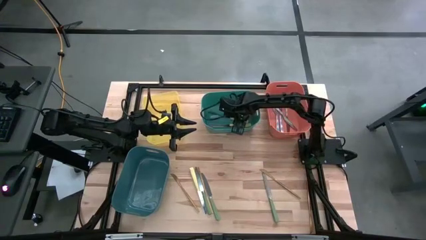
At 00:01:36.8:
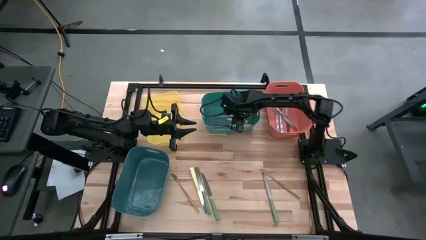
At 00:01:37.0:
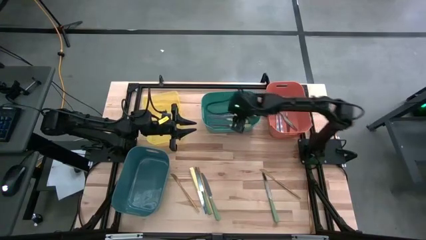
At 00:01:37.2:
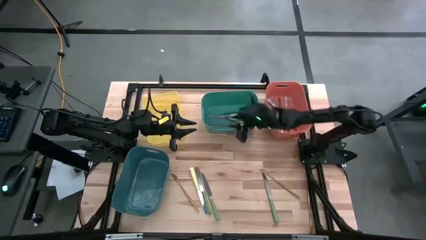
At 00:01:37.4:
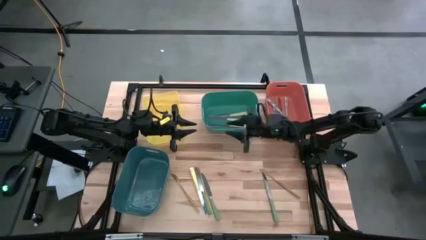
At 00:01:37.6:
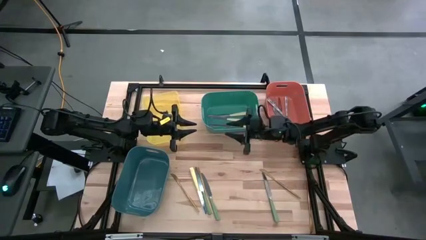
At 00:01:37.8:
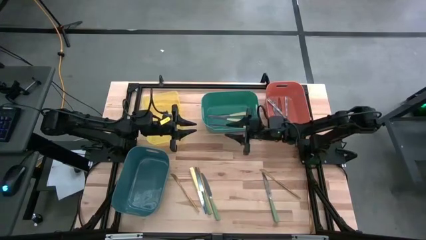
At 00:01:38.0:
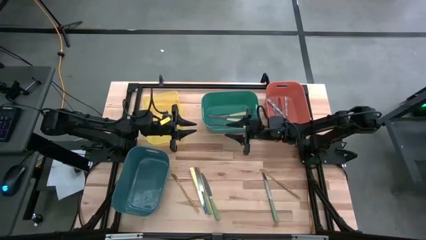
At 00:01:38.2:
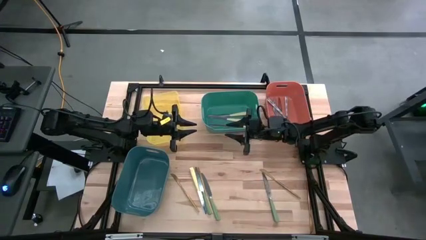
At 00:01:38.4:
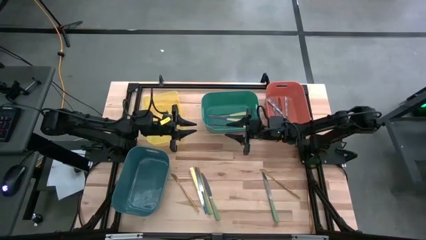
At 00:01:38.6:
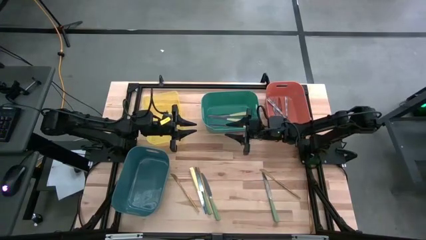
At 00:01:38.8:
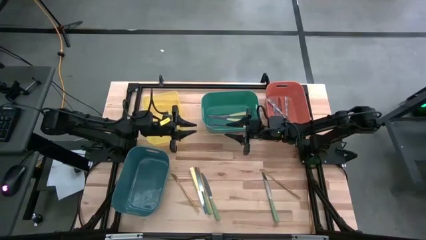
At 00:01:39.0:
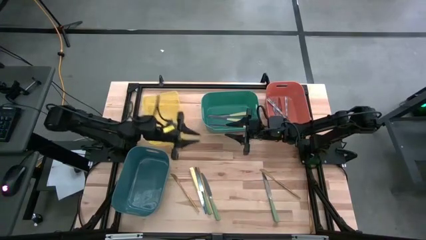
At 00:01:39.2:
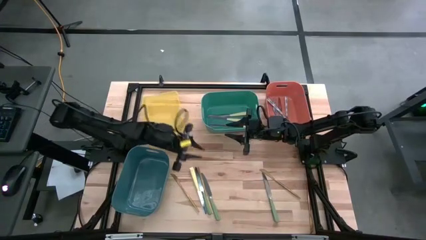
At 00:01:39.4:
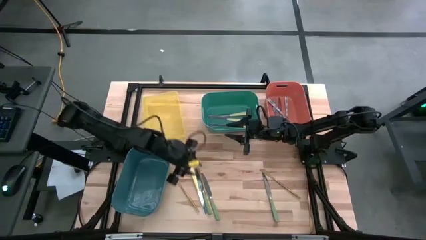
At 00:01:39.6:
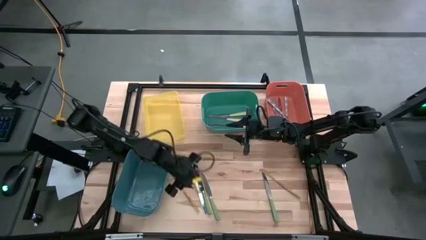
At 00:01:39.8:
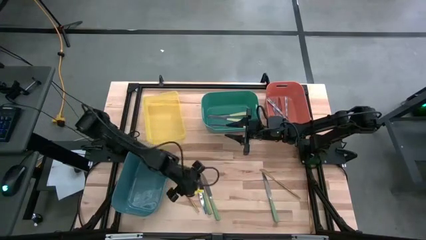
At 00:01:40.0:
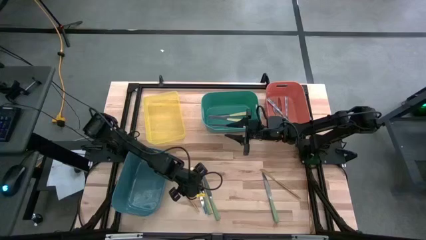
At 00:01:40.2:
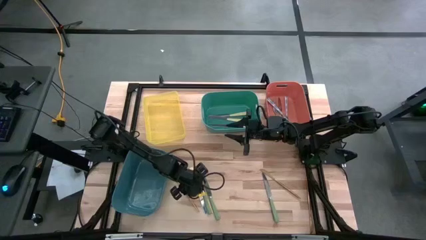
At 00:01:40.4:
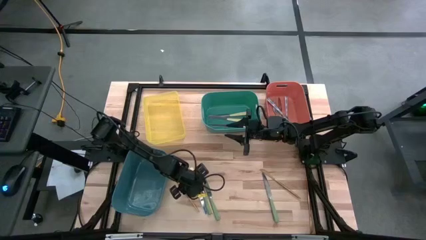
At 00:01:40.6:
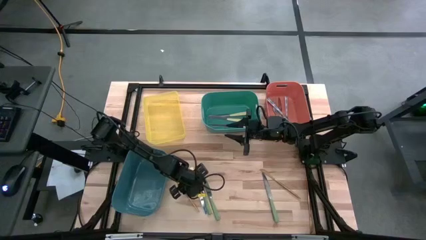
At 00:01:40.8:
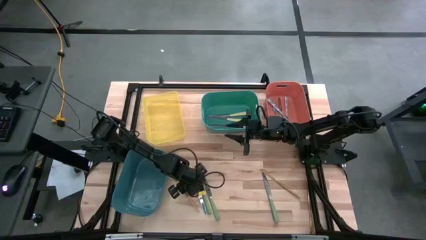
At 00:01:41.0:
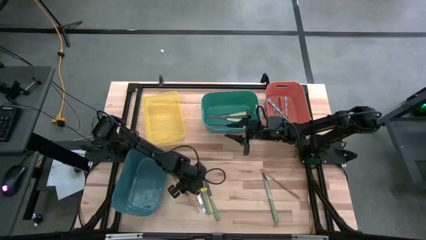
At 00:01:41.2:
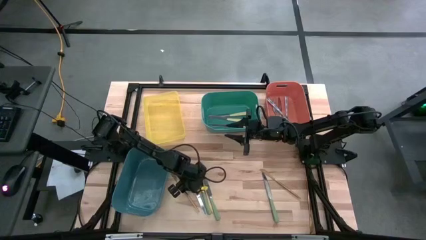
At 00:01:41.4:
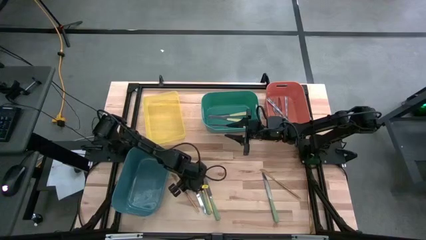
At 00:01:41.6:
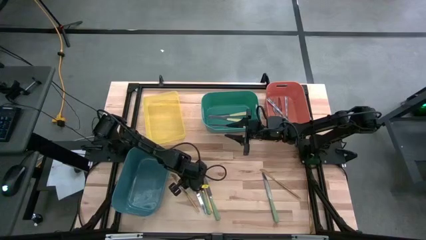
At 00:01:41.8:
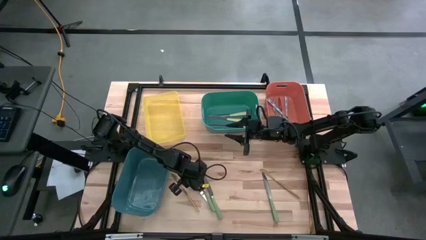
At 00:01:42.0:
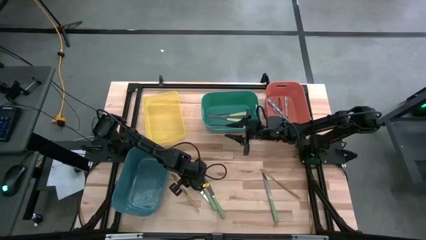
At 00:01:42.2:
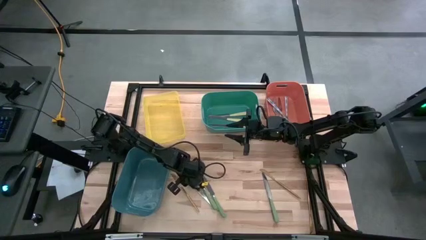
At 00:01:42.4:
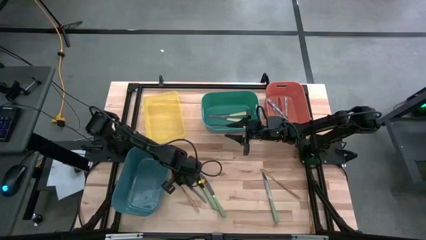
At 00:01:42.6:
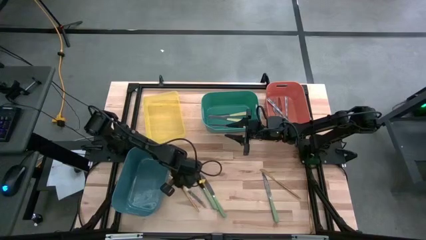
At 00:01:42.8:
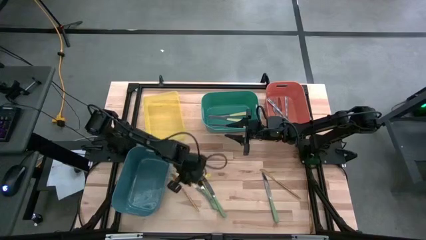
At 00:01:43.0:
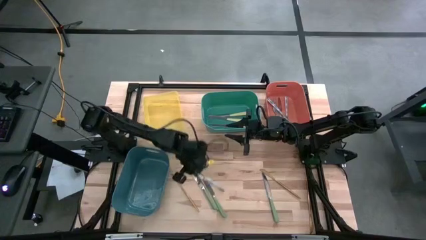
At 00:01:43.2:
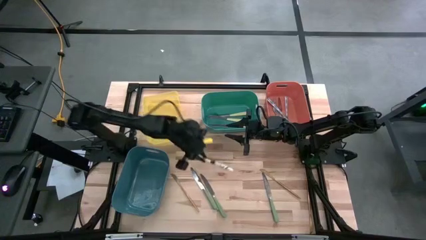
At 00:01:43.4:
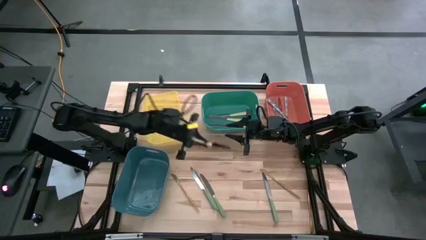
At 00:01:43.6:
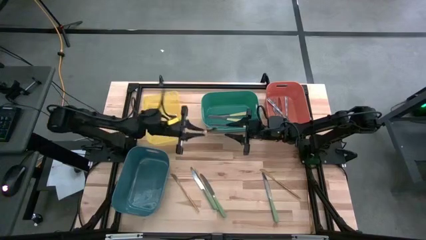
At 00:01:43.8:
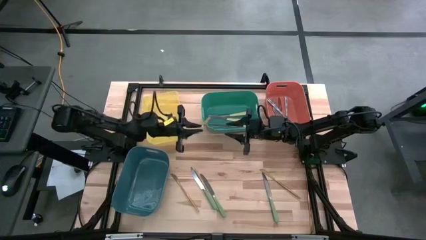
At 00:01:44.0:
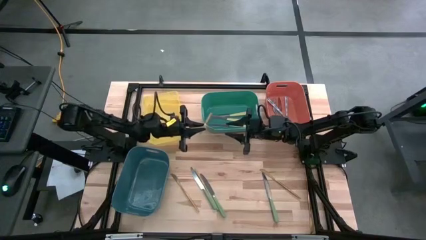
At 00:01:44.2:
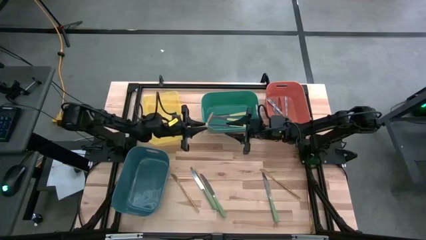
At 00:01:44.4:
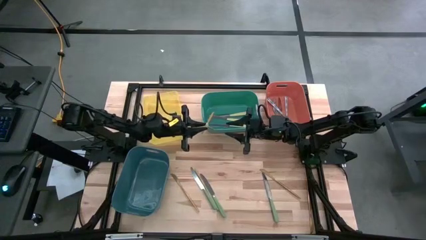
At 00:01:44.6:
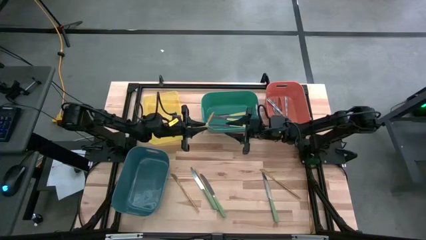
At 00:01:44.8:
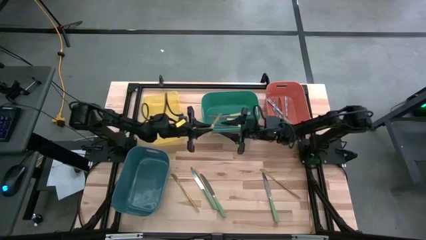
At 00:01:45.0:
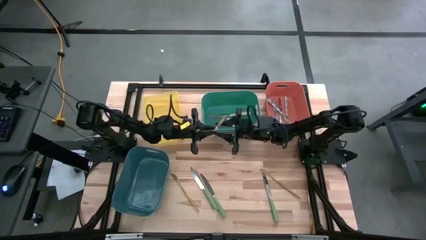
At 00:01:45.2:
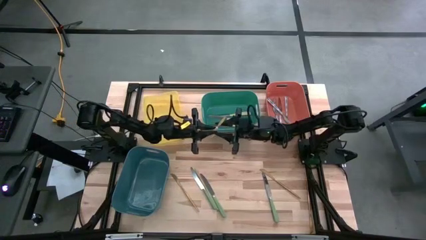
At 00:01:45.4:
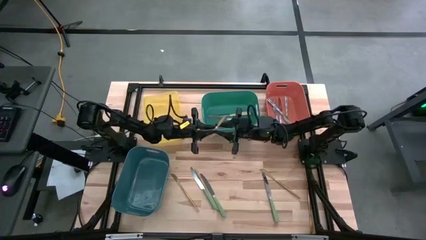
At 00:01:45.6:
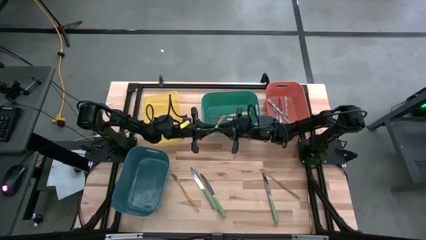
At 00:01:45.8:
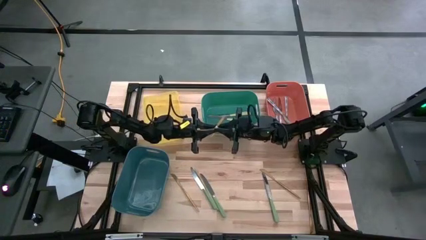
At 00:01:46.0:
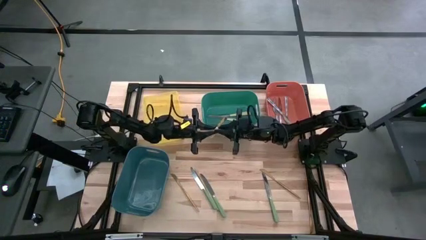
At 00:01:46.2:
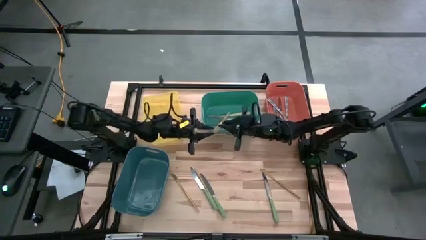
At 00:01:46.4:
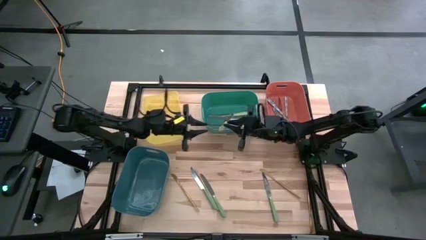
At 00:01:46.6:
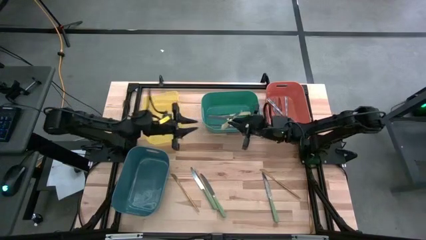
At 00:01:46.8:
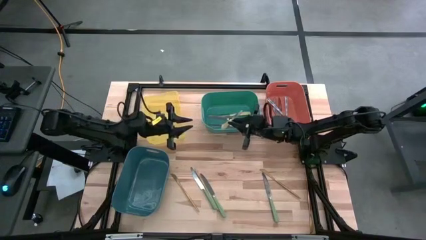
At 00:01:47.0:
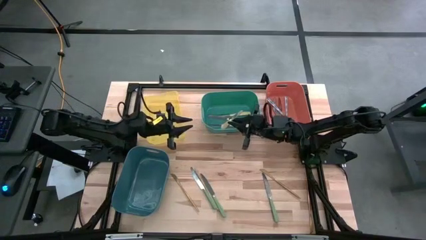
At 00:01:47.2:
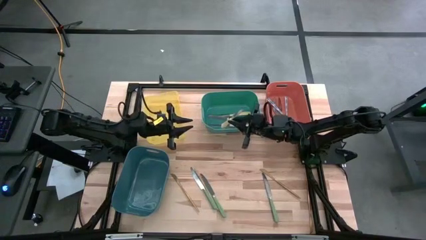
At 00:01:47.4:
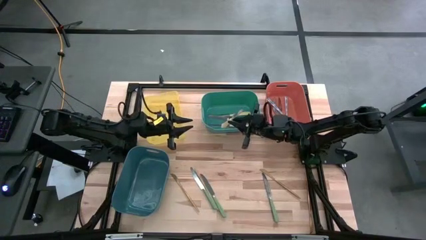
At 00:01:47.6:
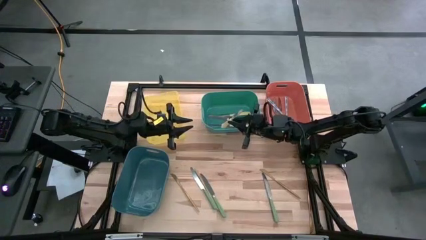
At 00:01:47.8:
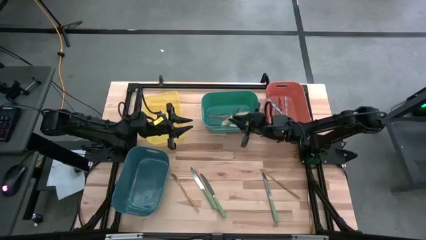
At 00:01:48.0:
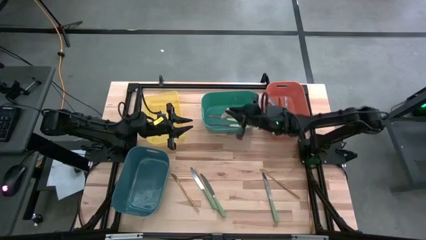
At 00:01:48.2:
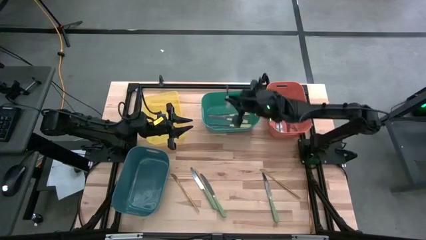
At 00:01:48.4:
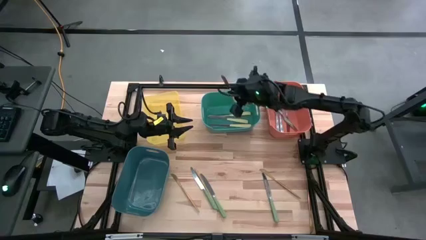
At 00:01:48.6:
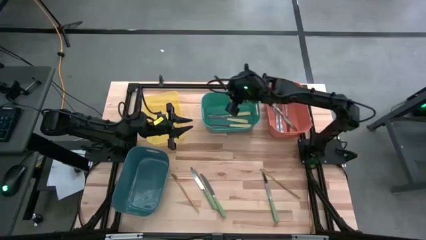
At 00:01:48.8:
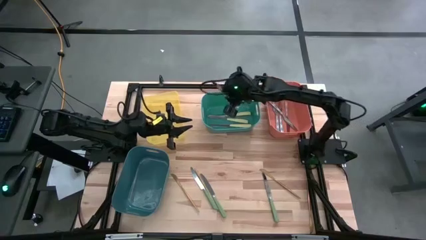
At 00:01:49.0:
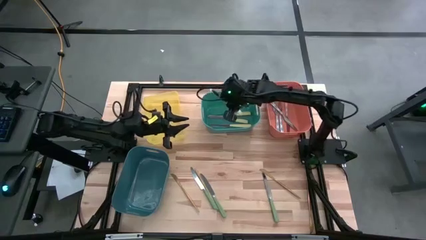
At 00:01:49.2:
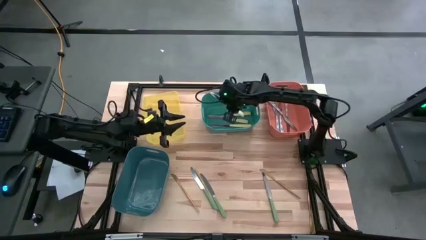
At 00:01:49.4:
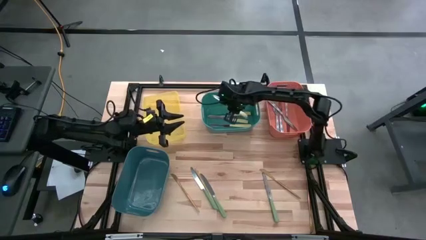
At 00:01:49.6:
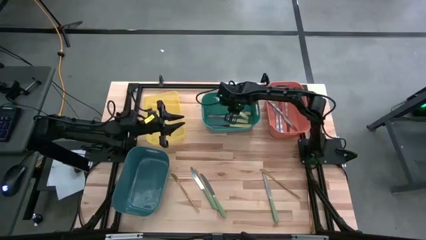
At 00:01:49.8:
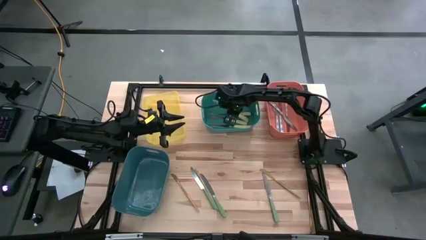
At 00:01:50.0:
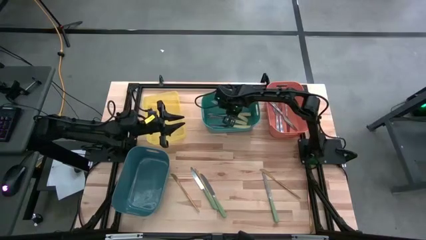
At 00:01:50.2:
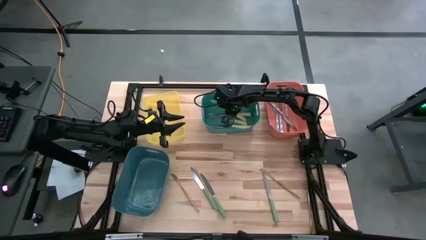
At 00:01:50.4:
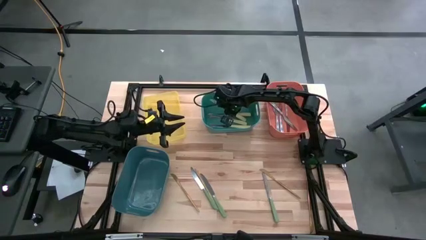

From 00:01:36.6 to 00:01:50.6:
Task: Sort silverware by color (type)
Put the yellow knife into the green bin
